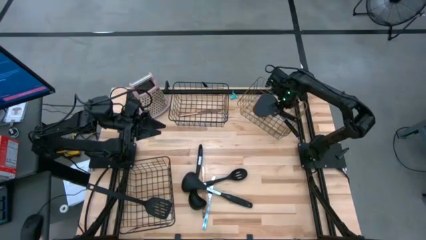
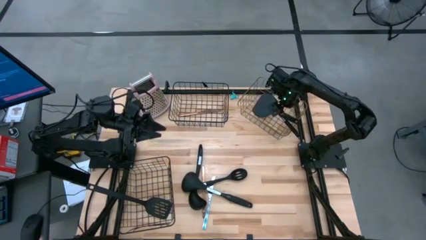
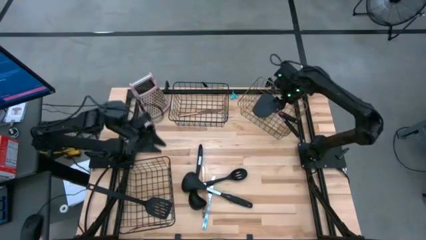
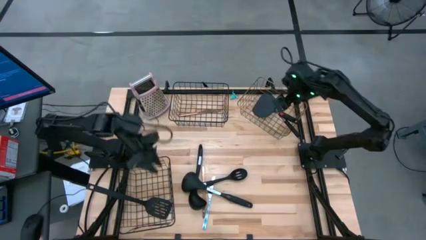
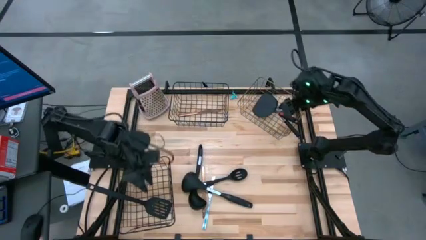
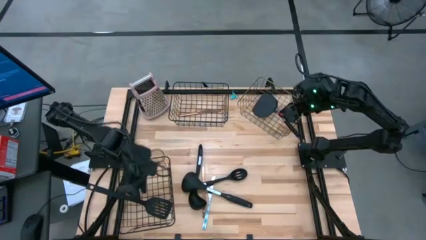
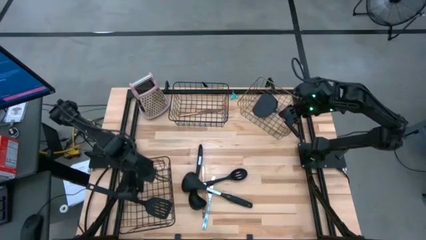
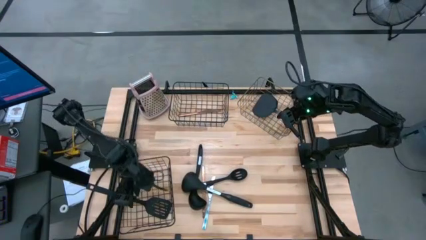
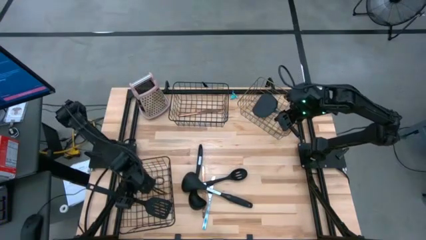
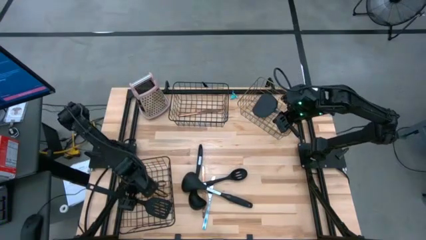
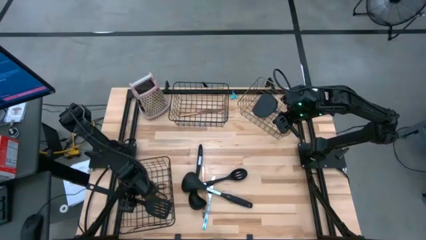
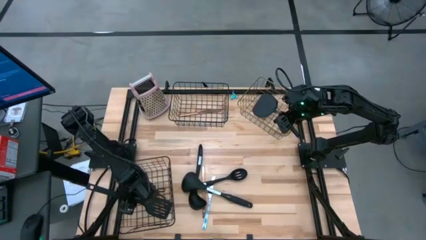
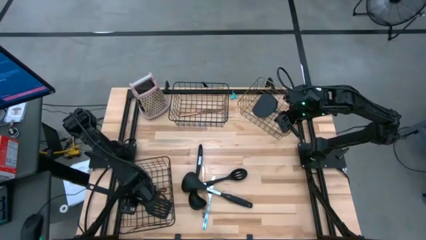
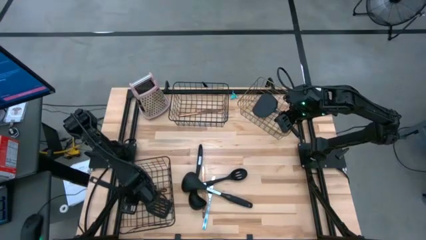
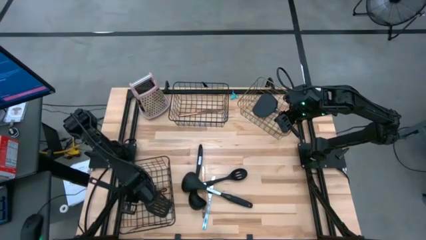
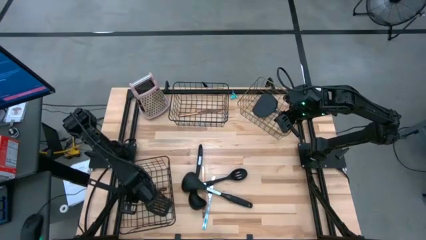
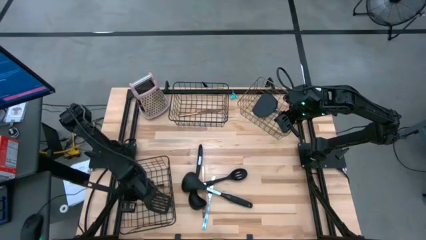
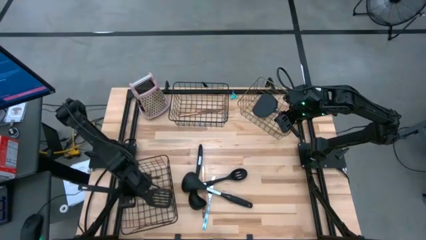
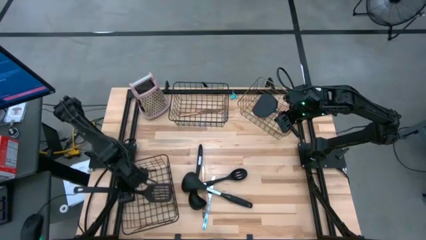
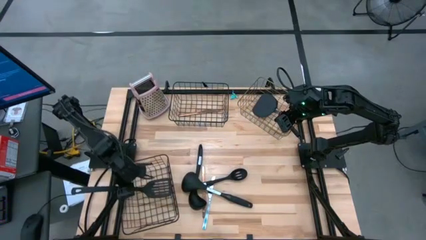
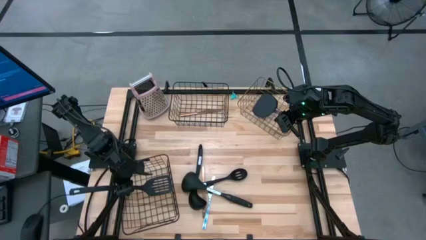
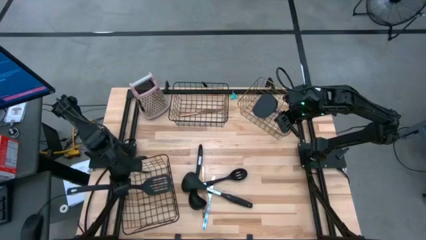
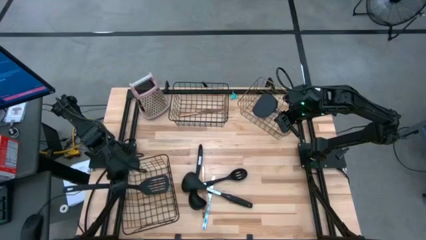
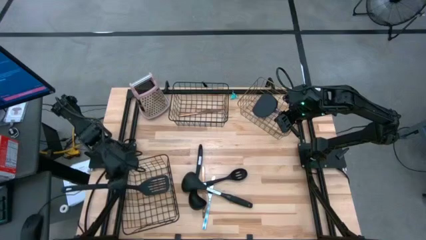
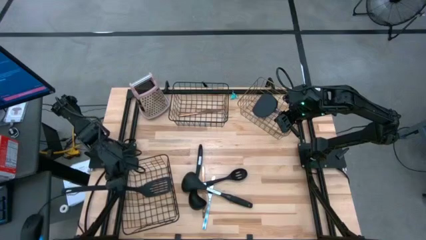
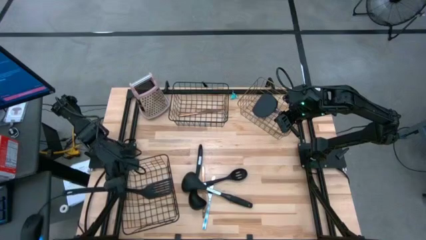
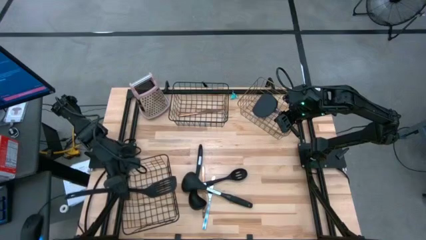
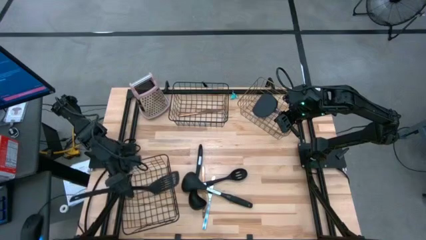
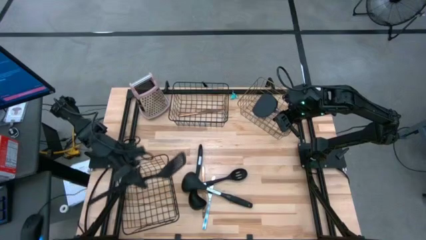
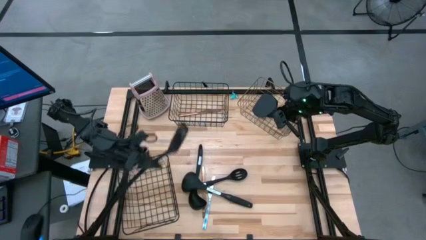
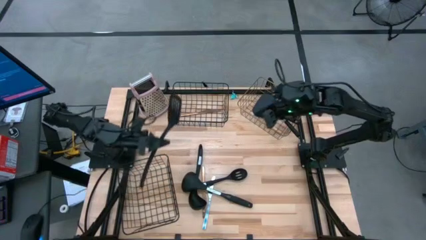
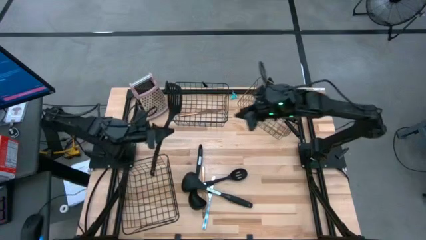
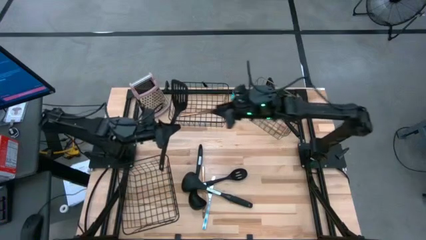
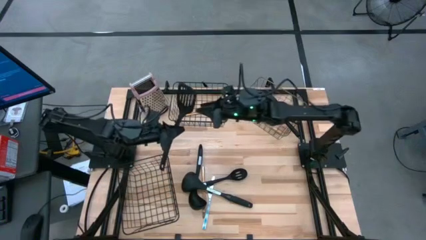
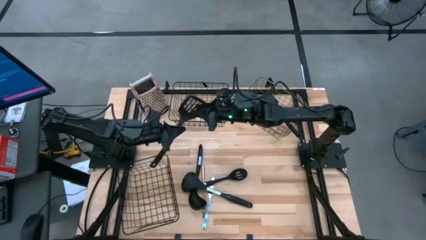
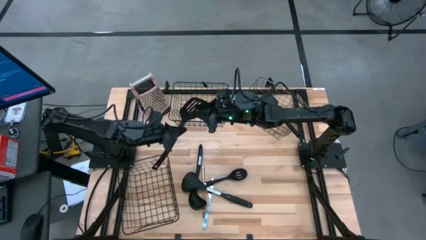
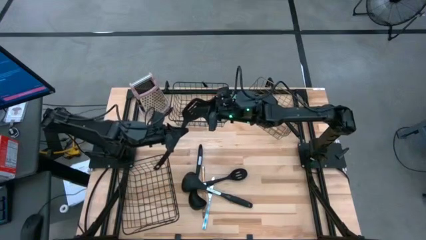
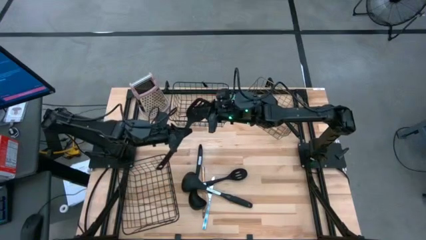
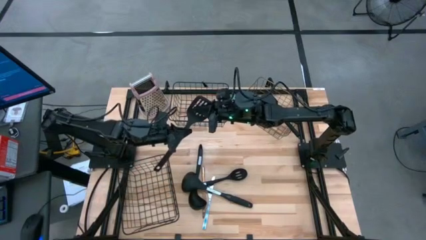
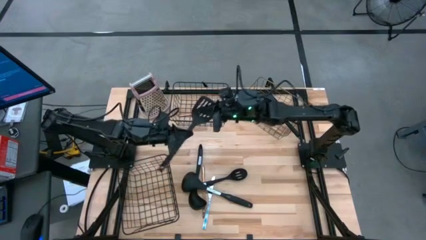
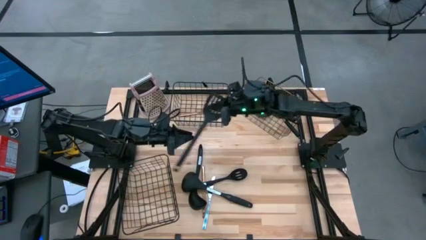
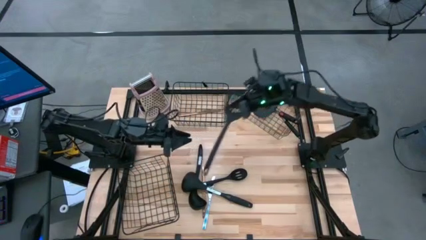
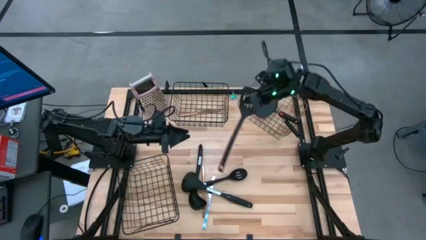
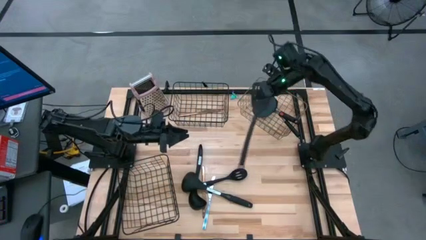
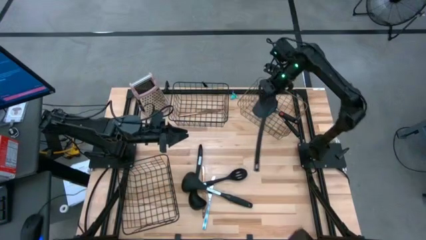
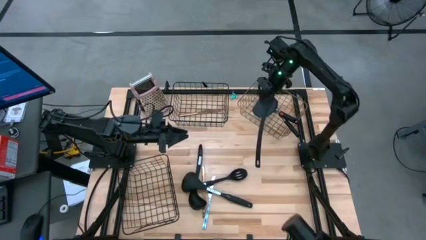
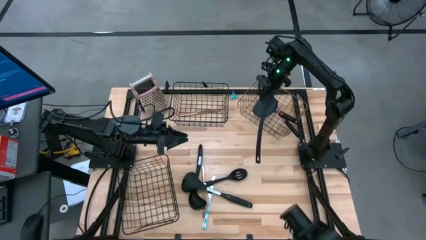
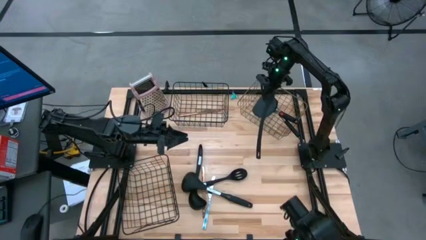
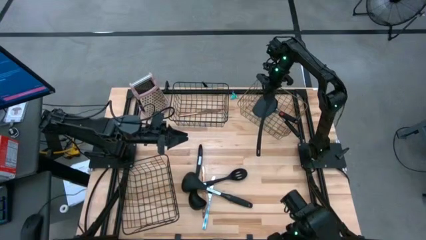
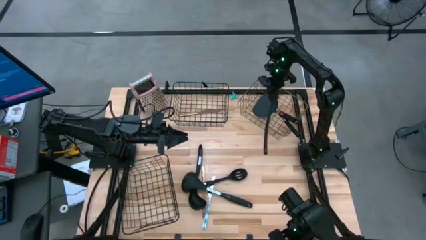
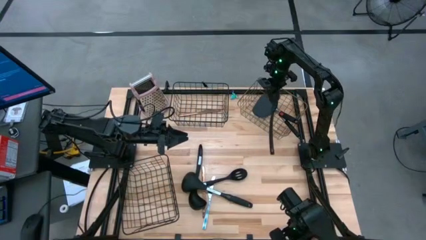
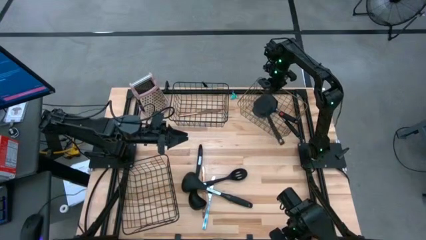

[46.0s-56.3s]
Task: Pick & Place Kitchen Items
Put the black spatula into the brown wire basket

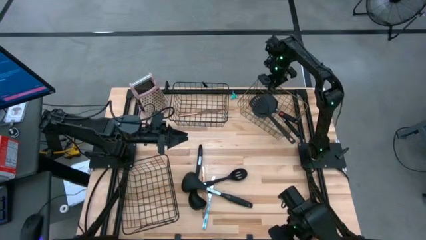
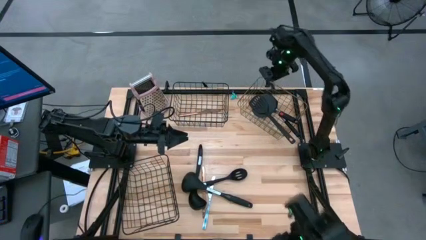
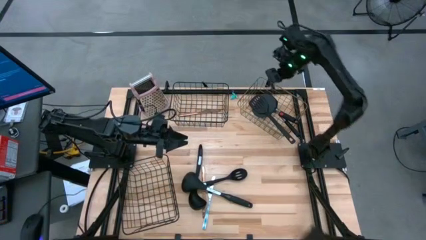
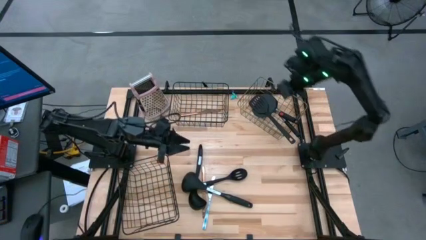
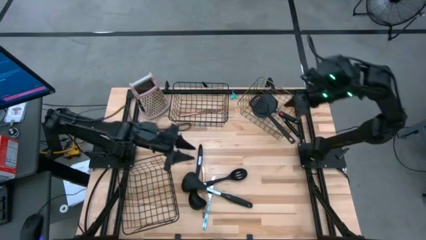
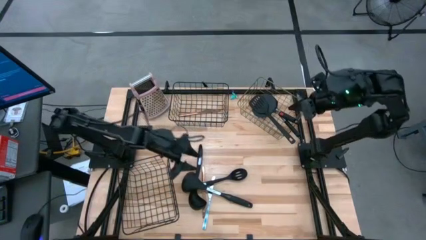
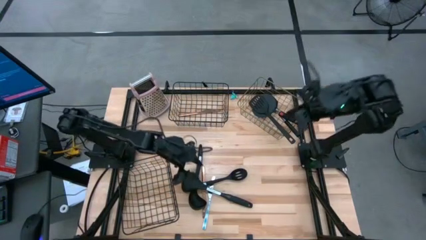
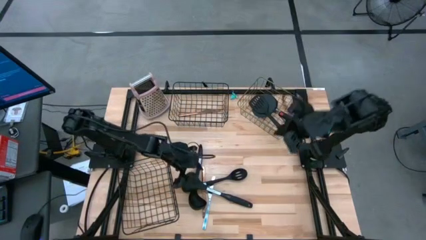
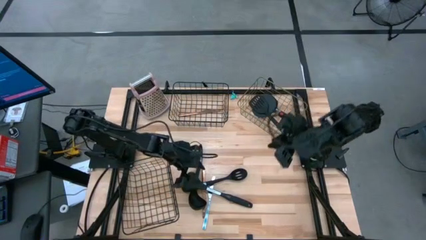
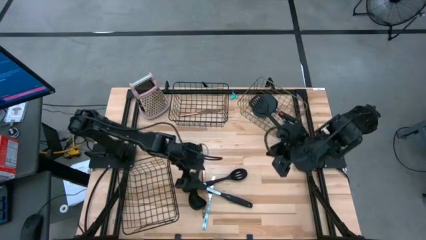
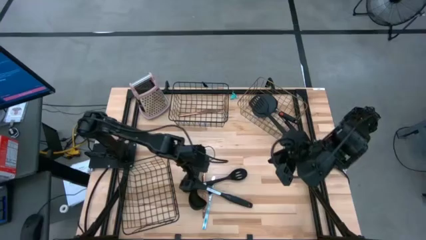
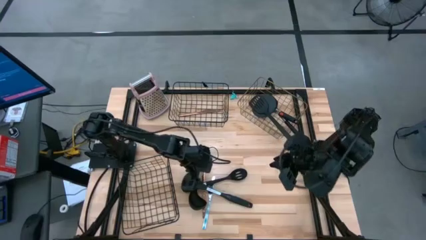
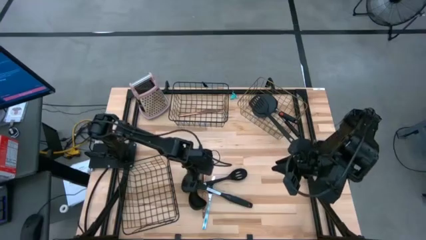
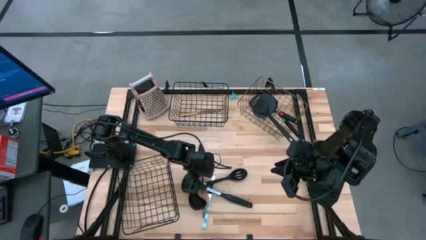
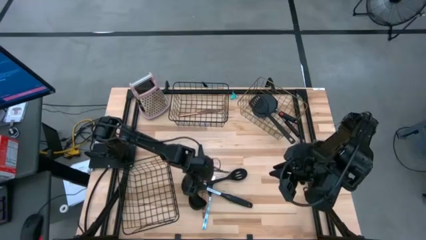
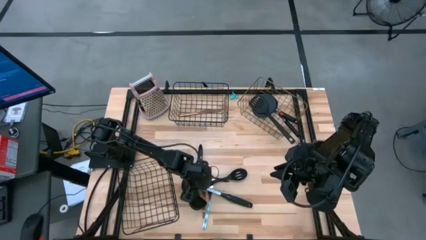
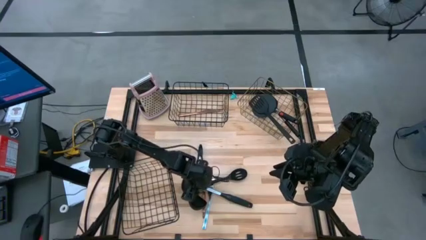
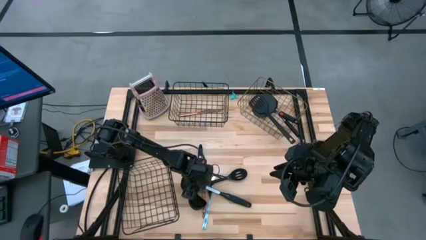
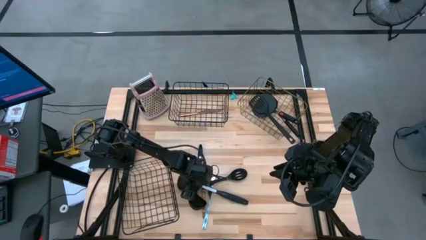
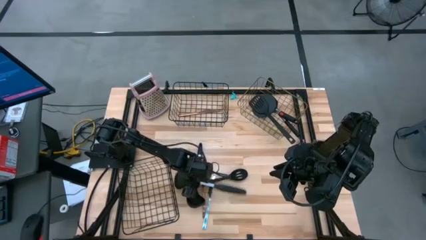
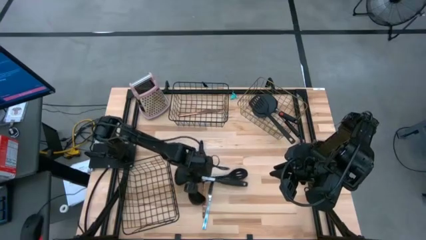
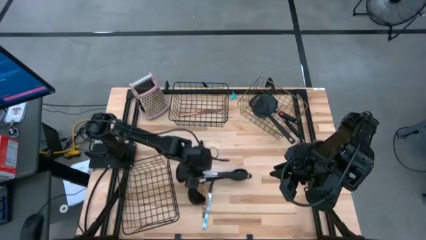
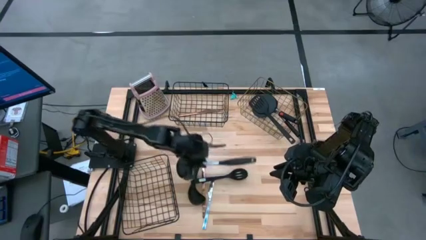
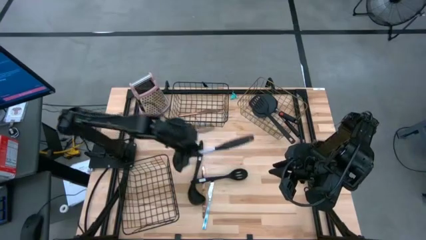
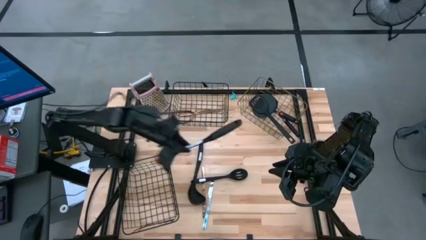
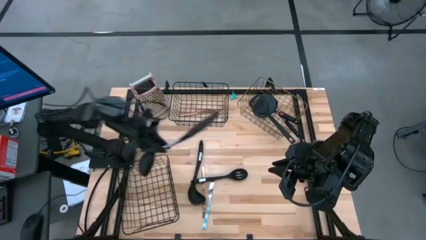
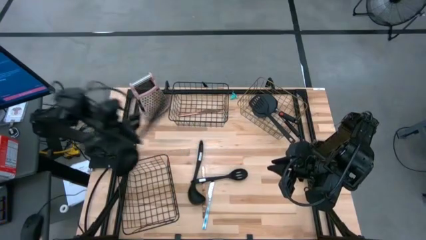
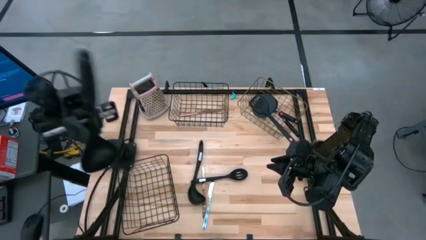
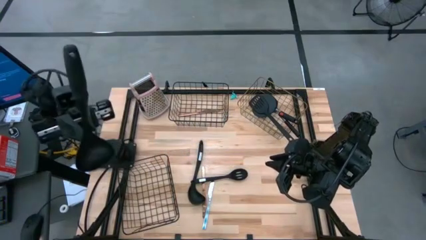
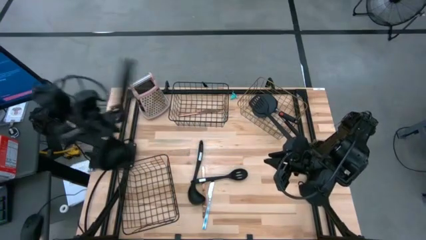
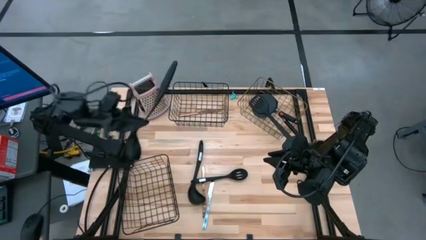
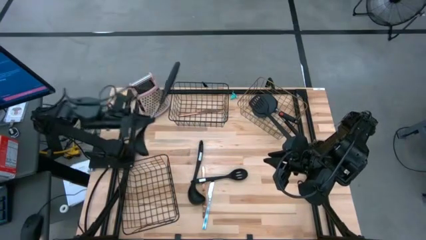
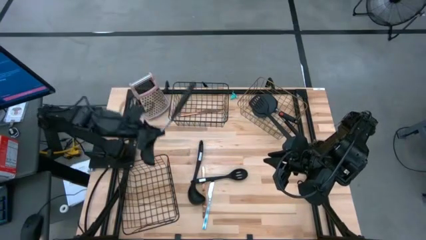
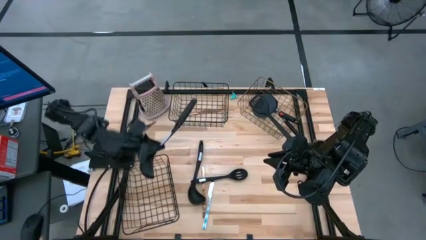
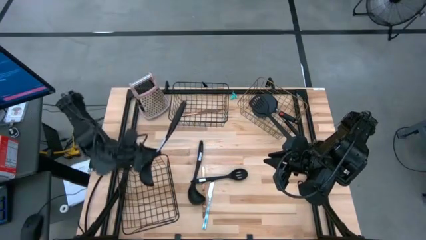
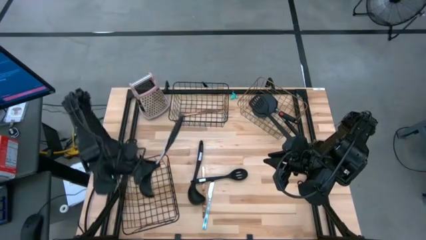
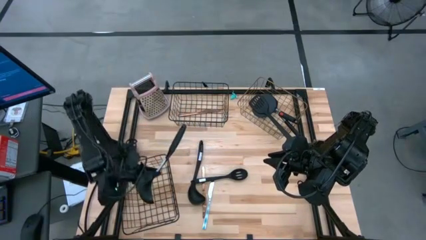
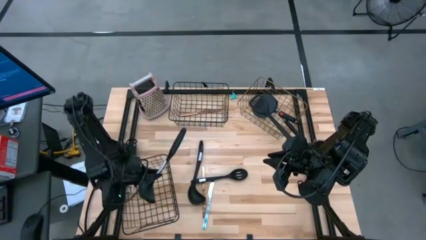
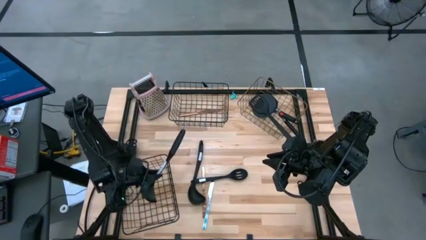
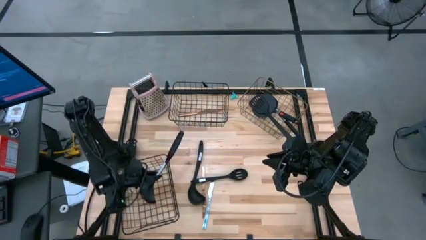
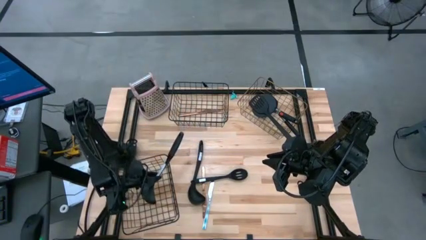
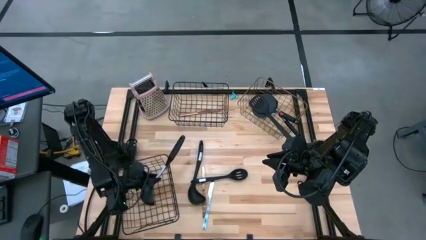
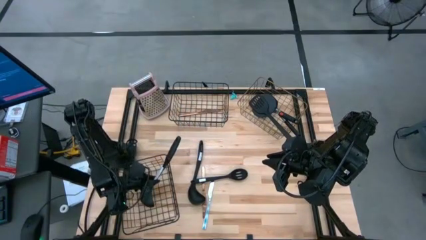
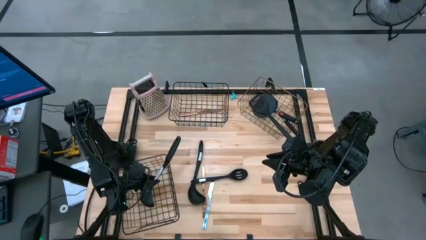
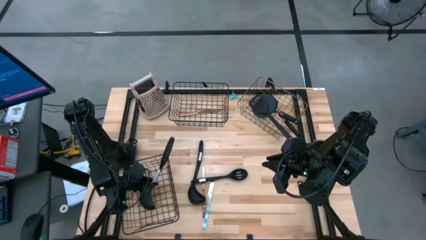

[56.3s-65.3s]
Put the black serving spoon into the bottom black wire basket
